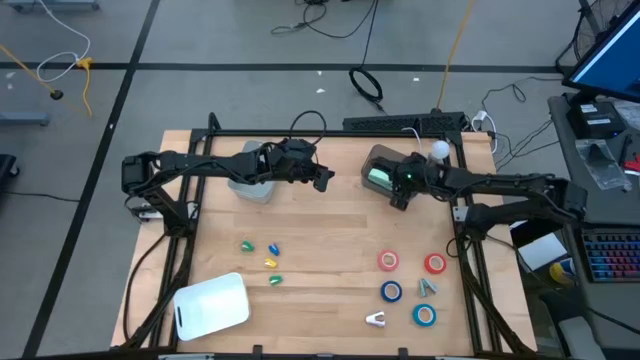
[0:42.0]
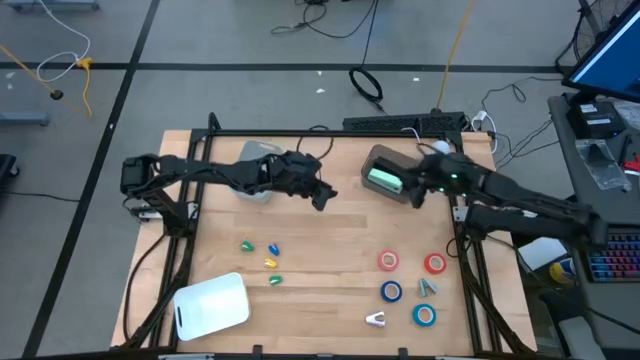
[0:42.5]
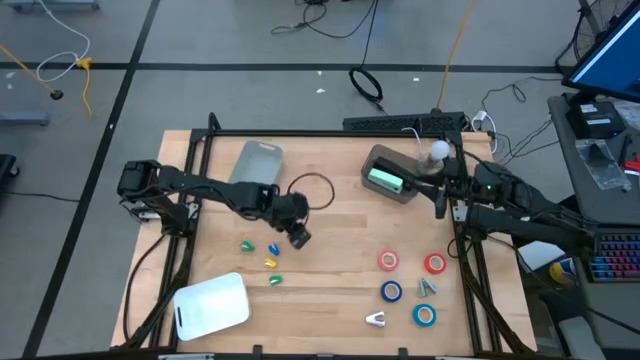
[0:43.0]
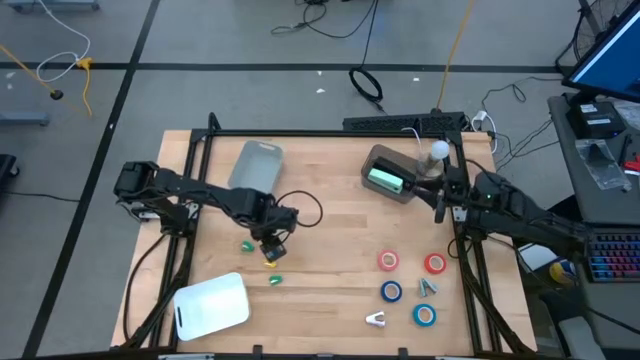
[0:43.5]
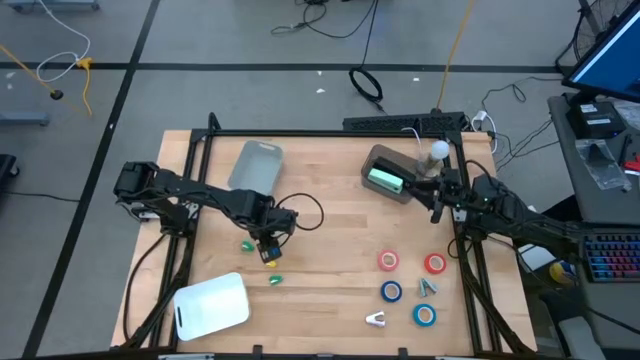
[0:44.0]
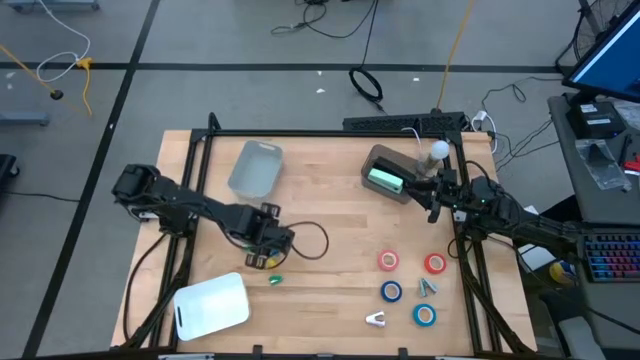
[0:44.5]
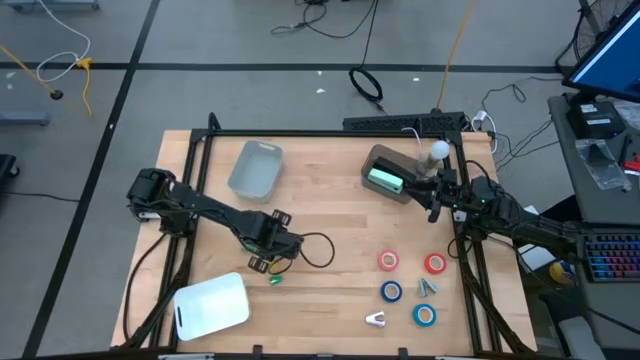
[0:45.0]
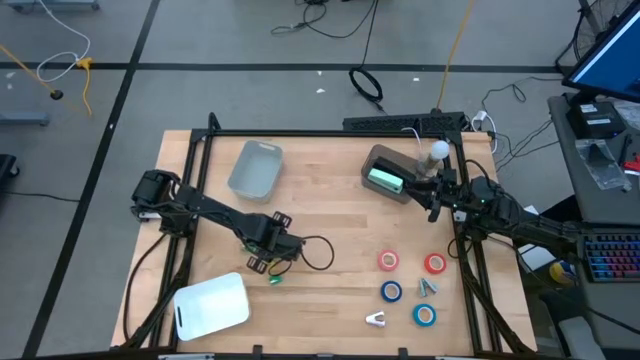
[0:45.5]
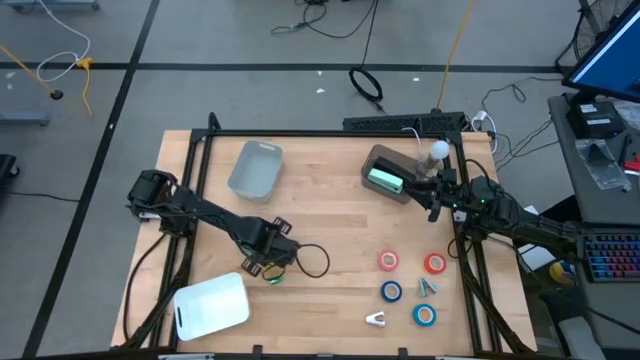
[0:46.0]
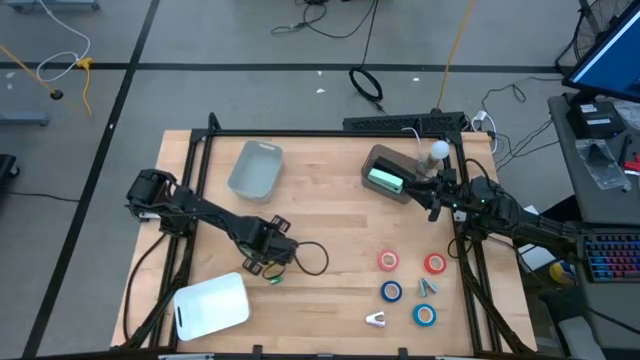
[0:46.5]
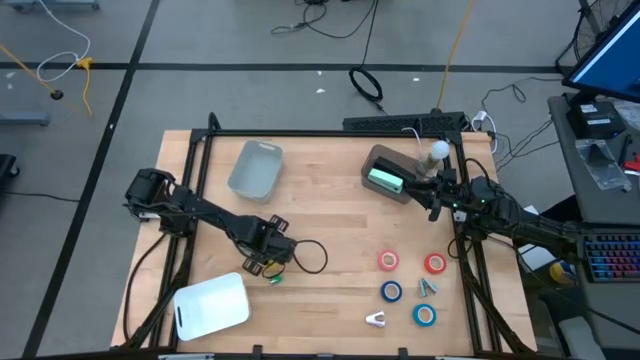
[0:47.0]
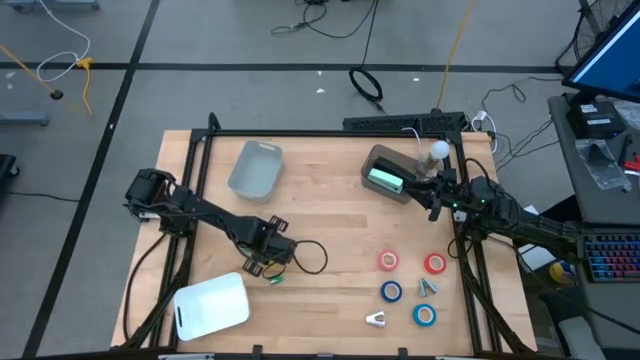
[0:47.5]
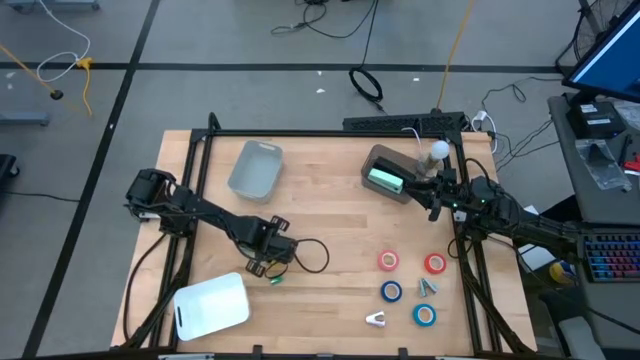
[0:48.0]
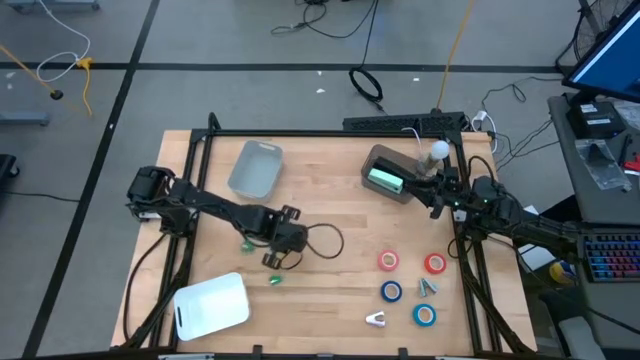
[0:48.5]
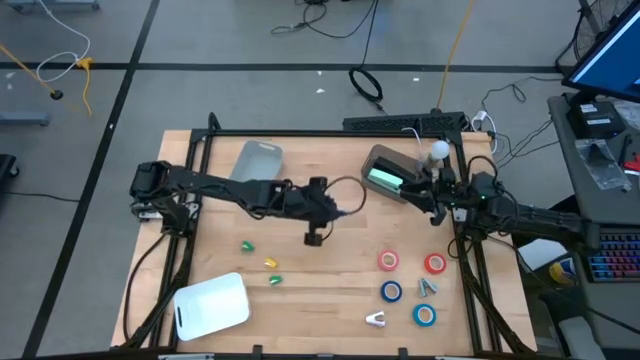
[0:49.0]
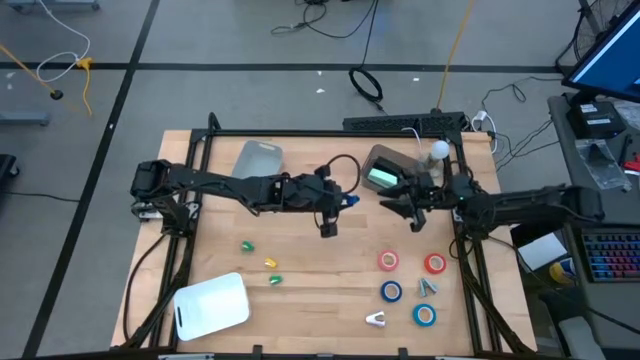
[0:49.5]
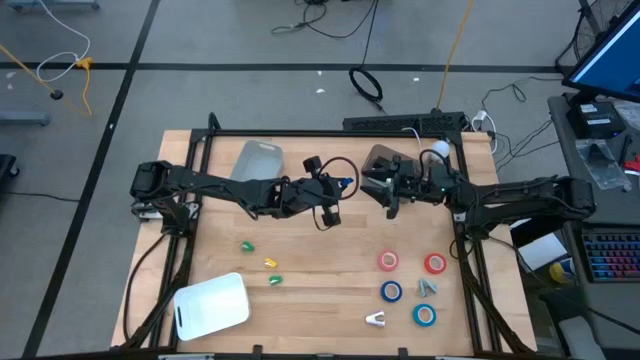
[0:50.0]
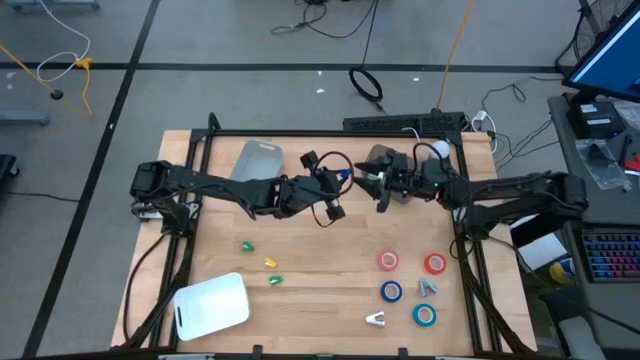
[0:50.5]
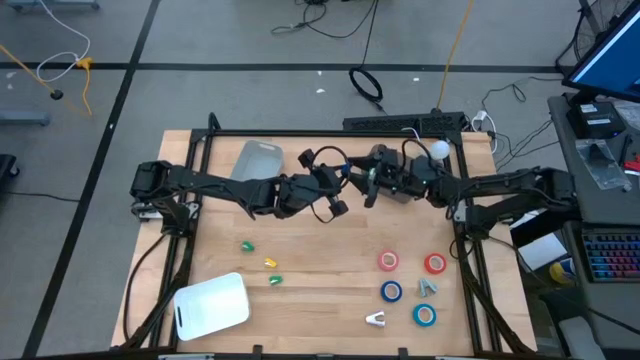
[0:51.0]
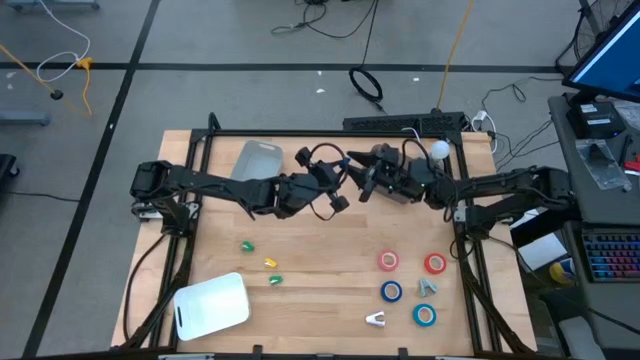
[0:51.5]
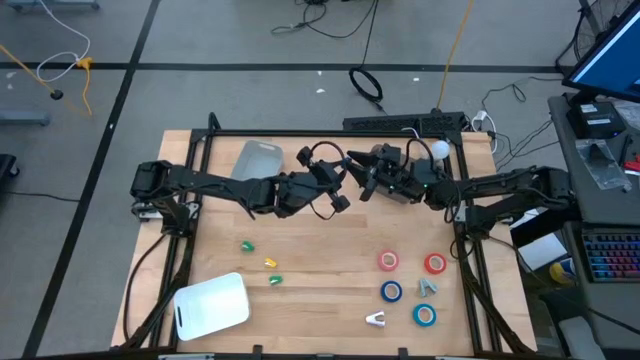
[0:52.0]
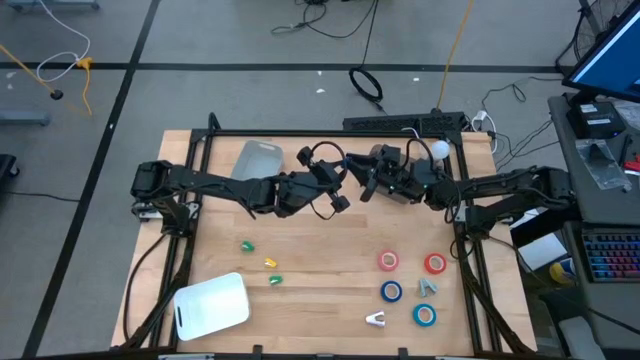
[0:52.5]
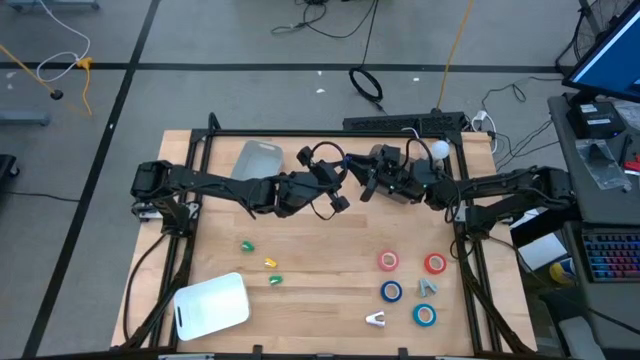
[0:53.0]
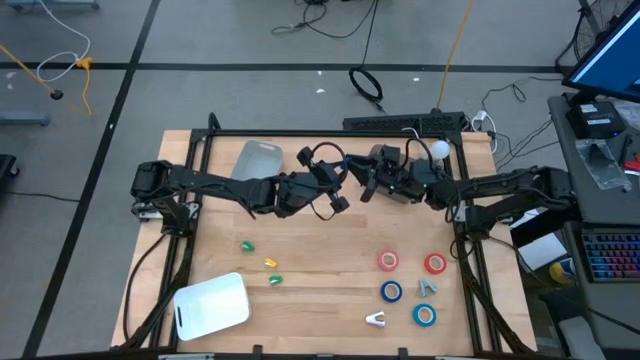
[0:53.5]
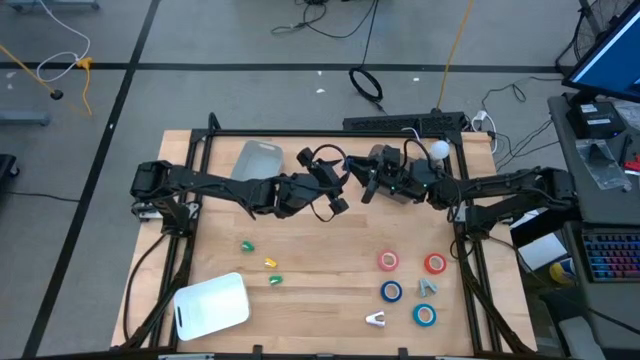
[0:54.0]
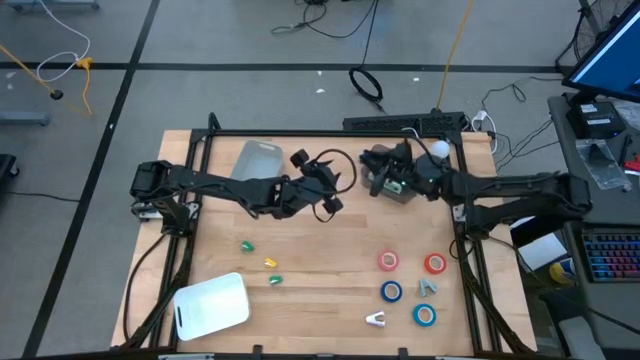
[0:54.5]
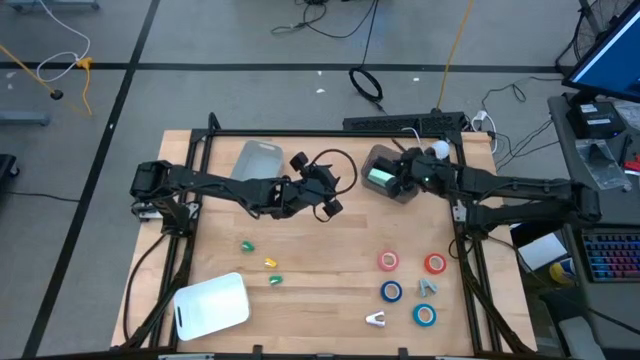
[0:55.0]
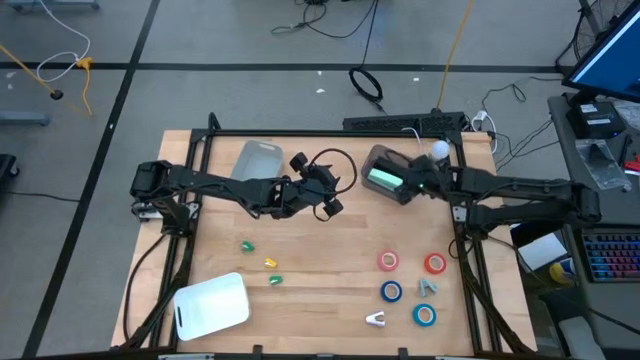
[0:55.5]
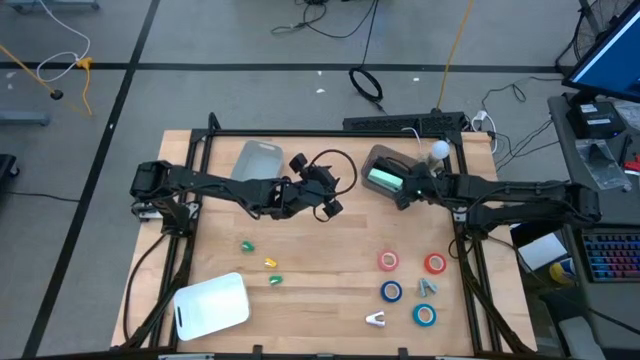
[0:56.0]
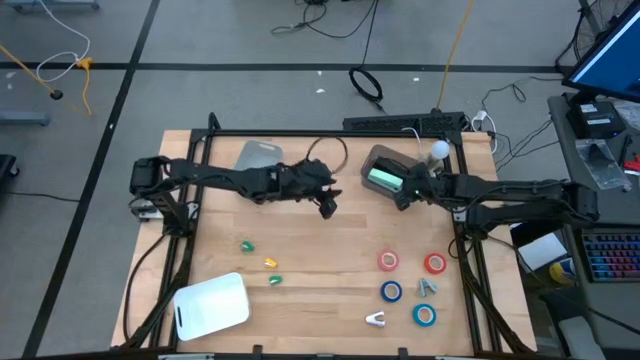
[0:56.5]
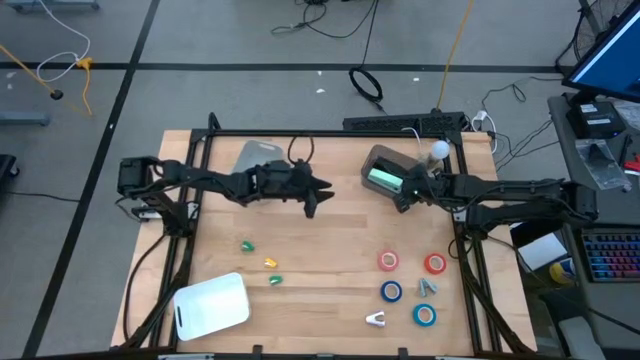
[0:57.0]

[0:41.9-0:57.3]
Task: Pick and place Stapler, Stapler remover, tape
Put the small blue stapler into the black bin

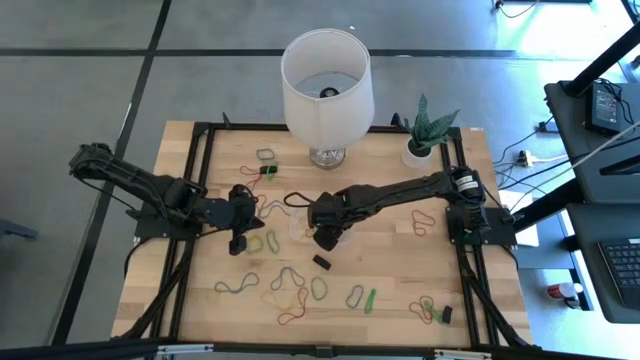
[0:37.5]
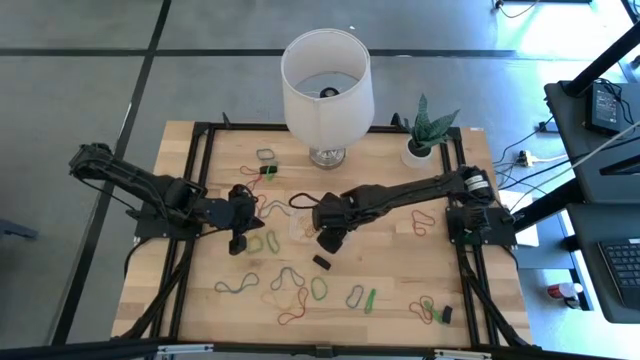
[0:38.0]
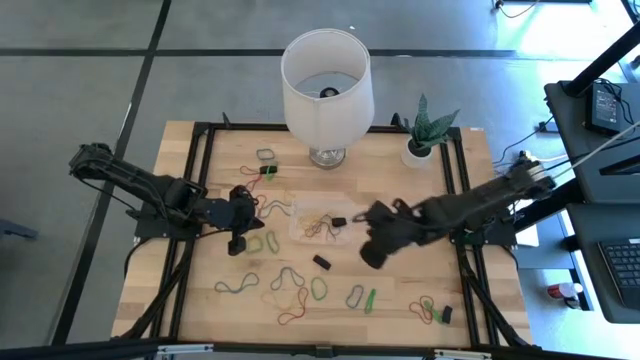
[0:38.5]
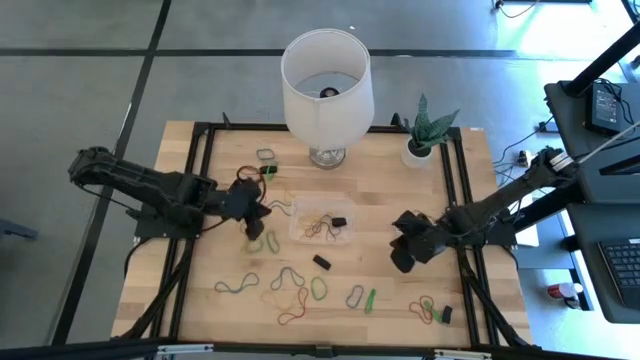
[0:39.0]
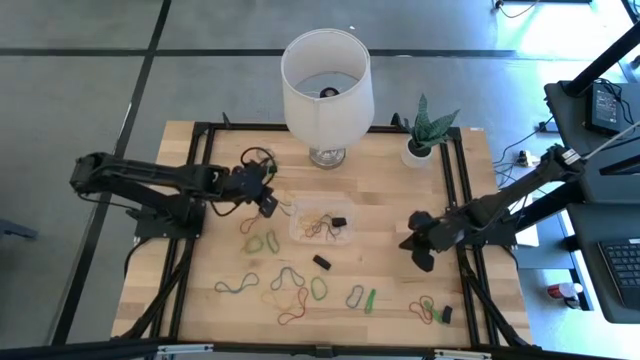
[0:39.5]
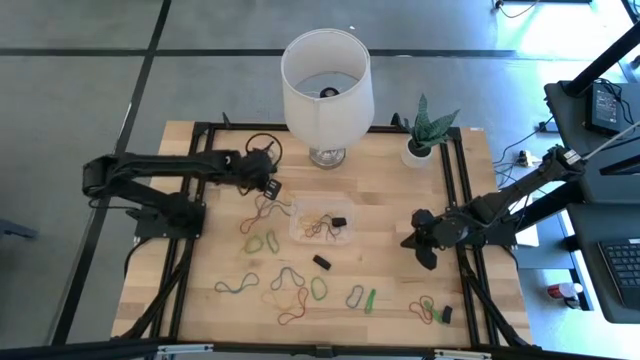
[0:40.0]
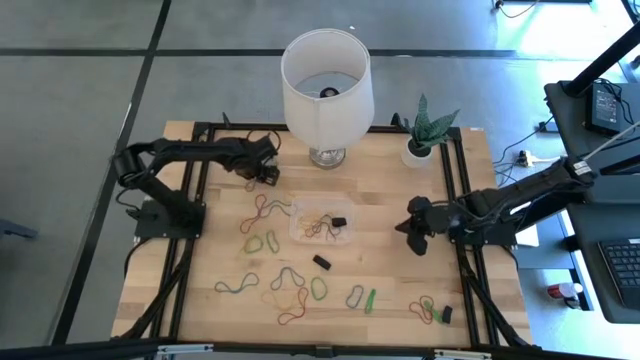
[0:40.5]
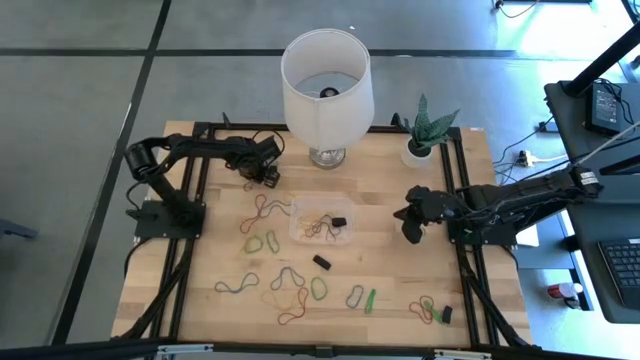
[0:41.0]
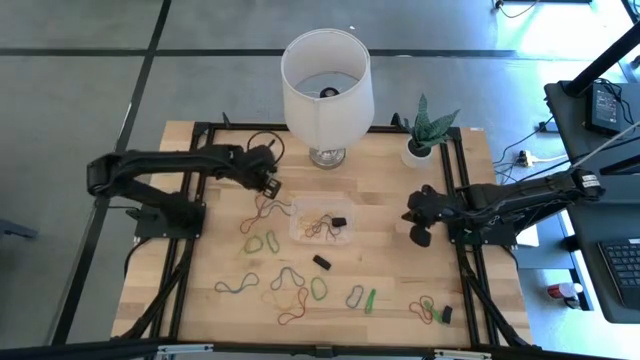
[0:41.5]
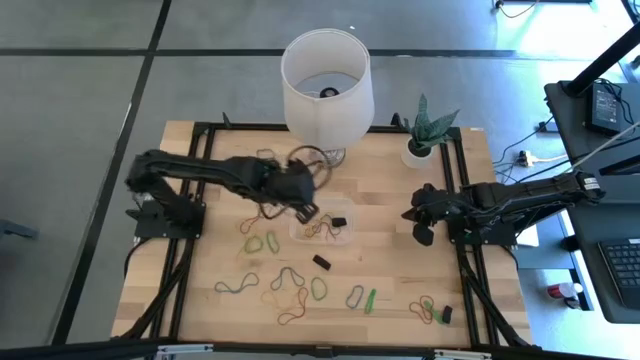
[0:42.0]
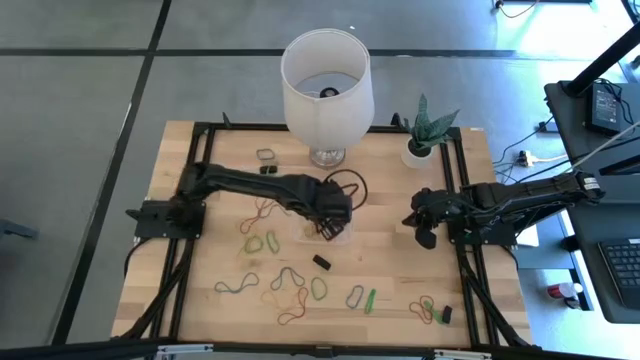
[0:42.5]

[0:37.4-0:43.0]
Task: Pick and place rubber bands into bin
Put the red rubber band into the container
